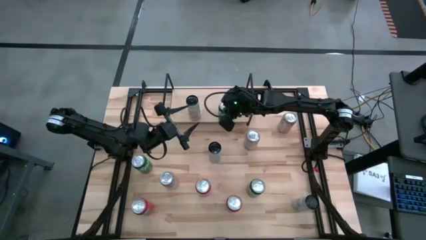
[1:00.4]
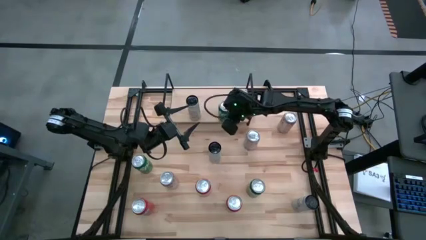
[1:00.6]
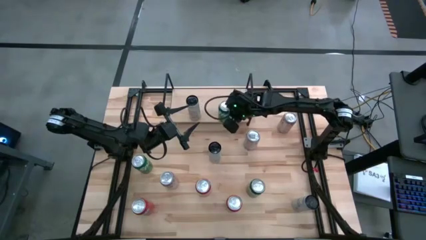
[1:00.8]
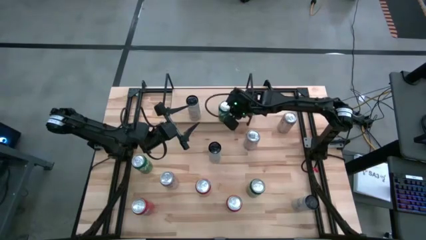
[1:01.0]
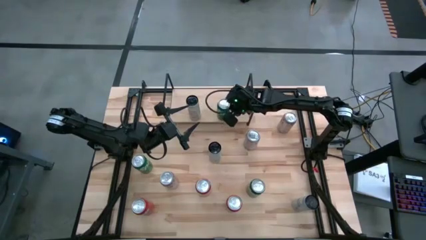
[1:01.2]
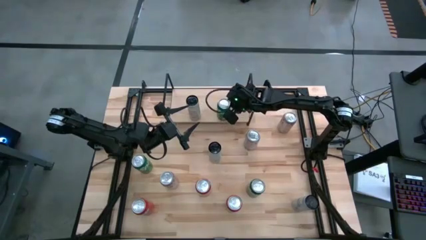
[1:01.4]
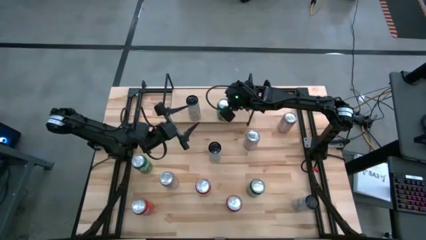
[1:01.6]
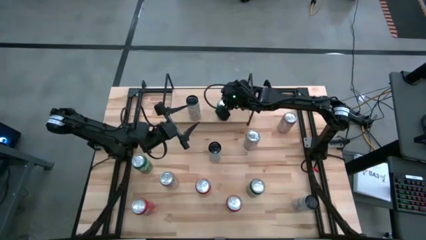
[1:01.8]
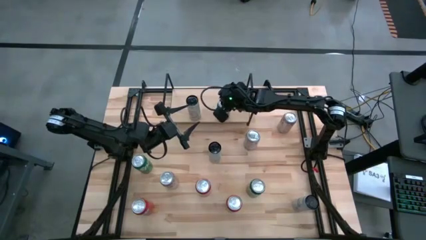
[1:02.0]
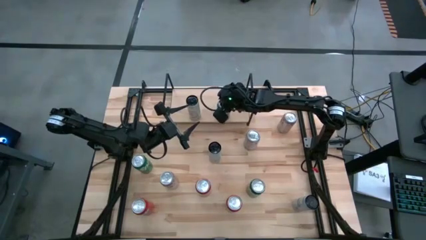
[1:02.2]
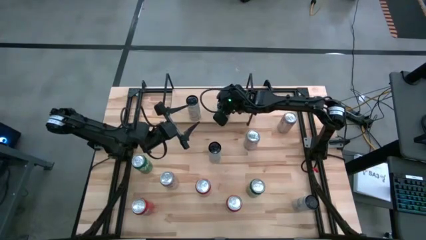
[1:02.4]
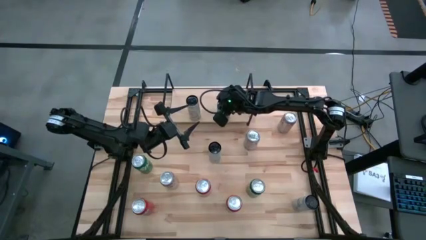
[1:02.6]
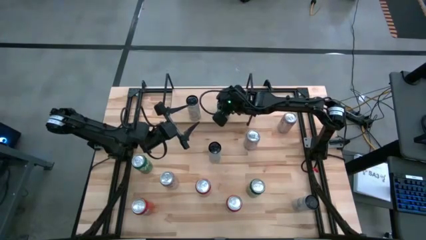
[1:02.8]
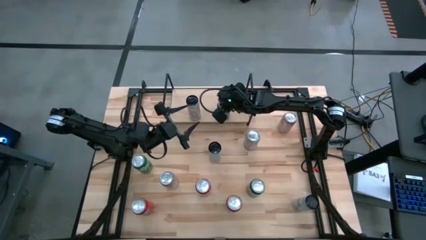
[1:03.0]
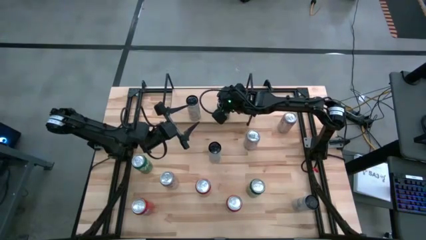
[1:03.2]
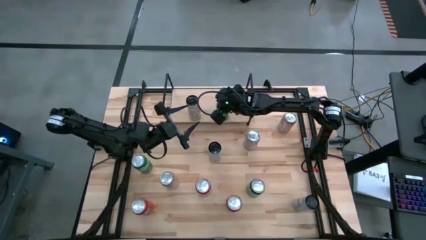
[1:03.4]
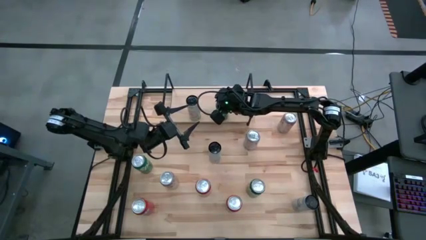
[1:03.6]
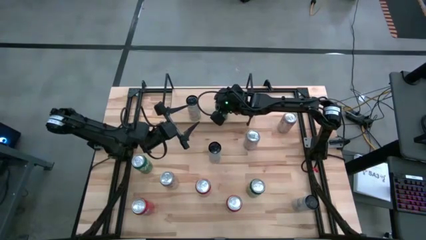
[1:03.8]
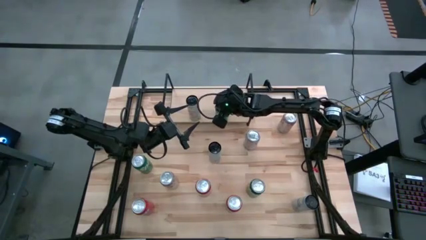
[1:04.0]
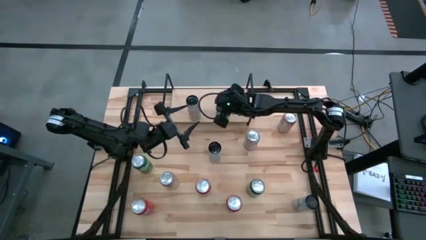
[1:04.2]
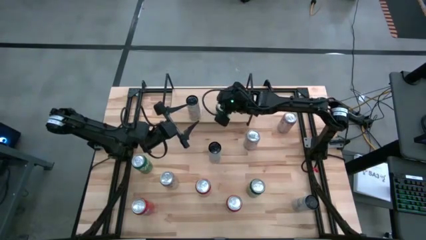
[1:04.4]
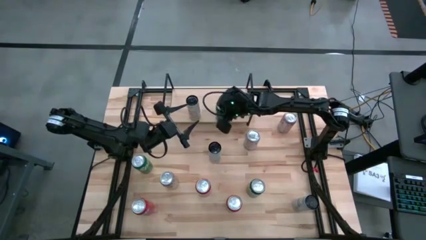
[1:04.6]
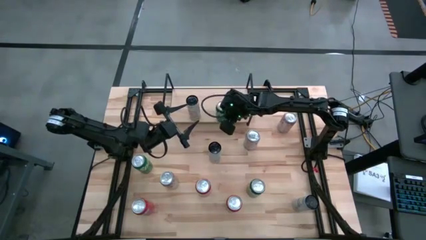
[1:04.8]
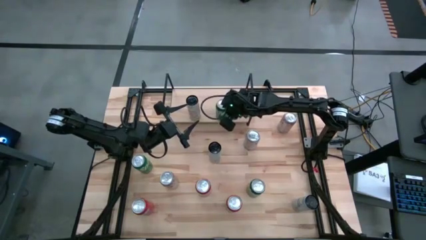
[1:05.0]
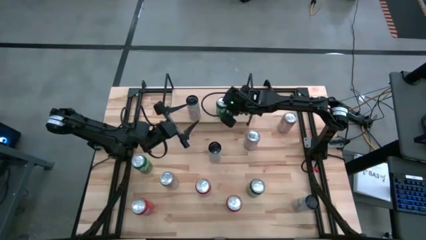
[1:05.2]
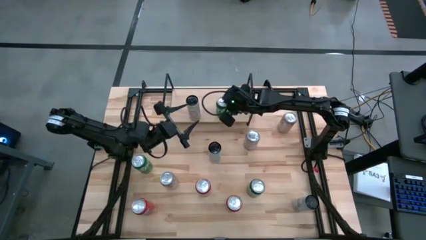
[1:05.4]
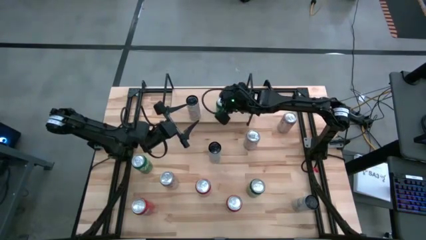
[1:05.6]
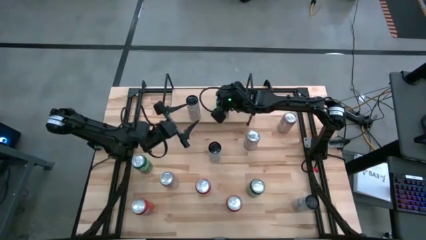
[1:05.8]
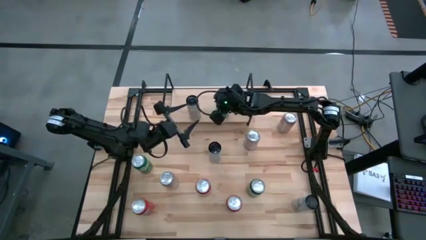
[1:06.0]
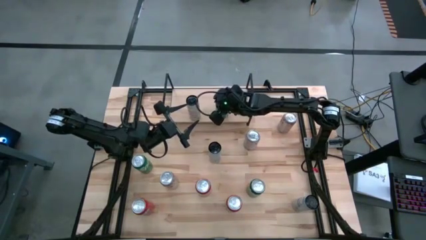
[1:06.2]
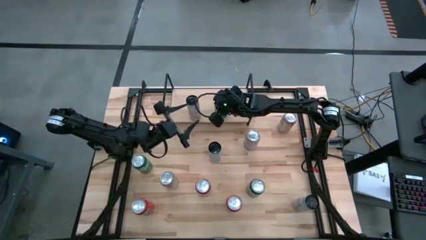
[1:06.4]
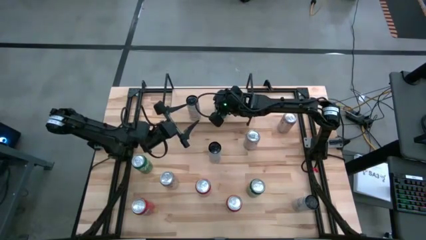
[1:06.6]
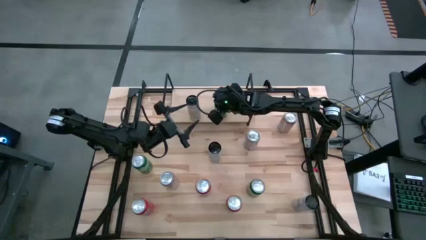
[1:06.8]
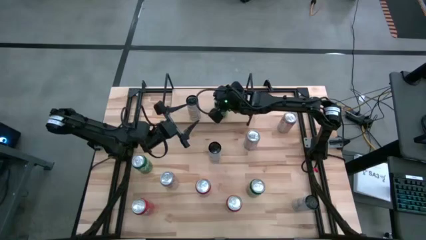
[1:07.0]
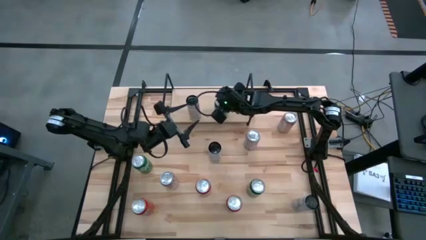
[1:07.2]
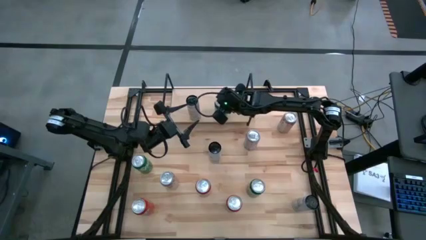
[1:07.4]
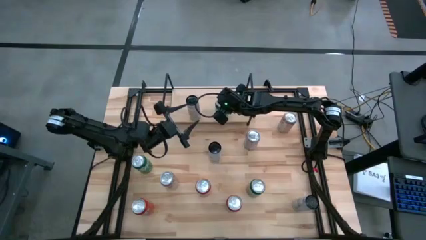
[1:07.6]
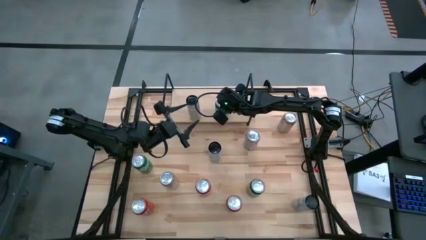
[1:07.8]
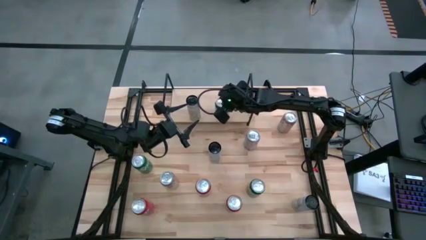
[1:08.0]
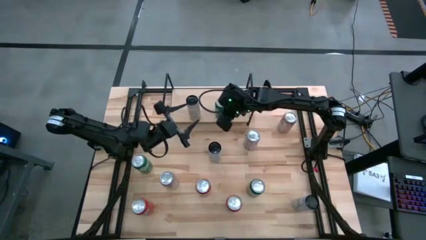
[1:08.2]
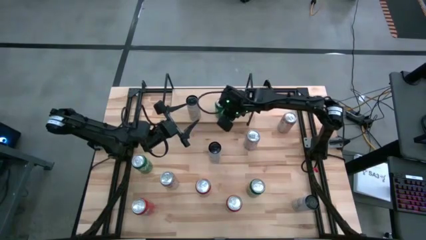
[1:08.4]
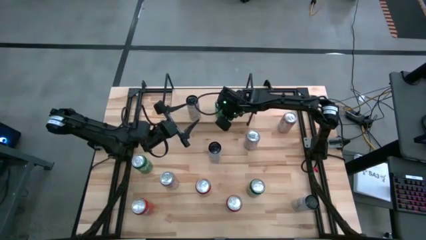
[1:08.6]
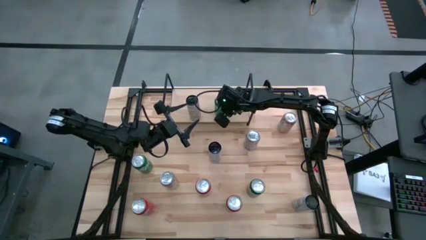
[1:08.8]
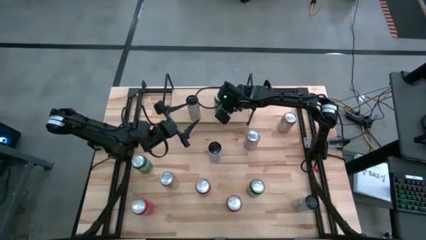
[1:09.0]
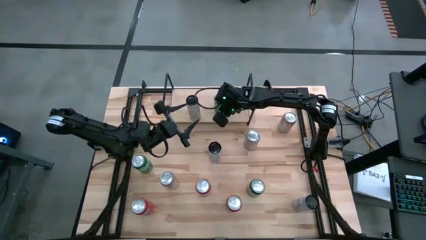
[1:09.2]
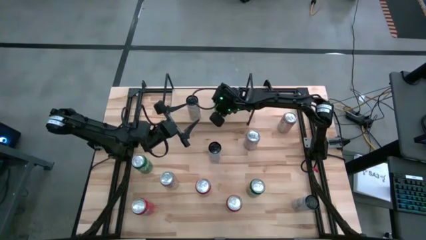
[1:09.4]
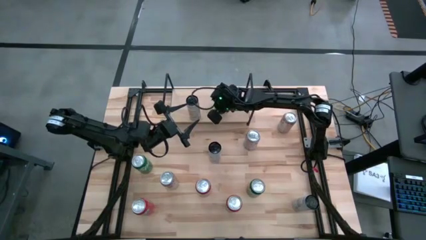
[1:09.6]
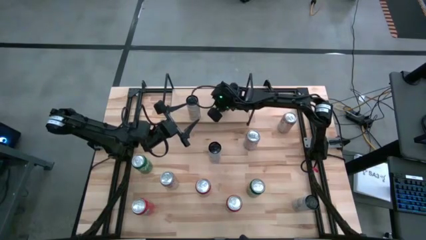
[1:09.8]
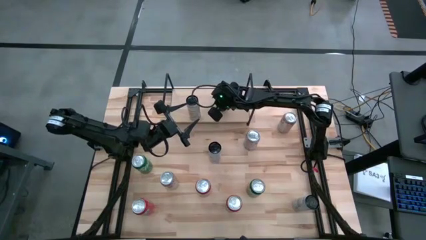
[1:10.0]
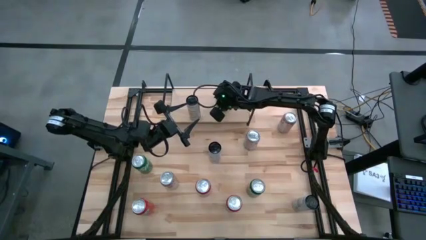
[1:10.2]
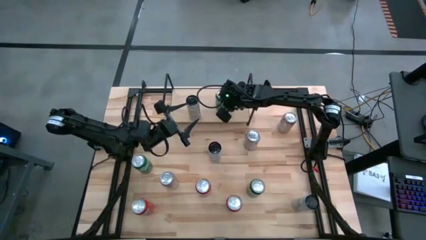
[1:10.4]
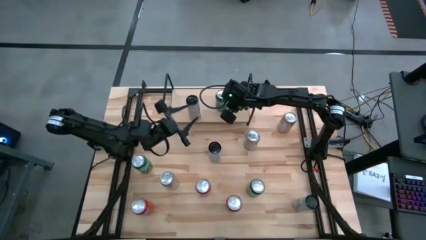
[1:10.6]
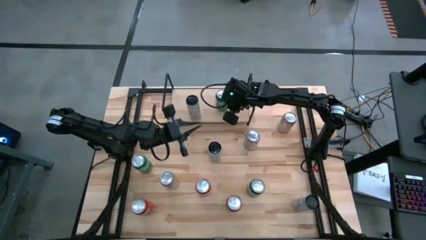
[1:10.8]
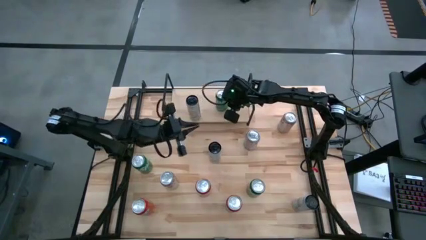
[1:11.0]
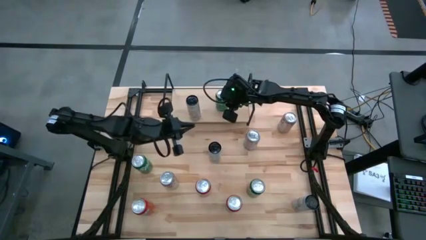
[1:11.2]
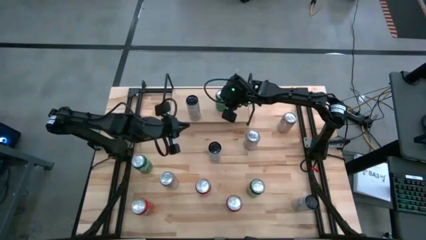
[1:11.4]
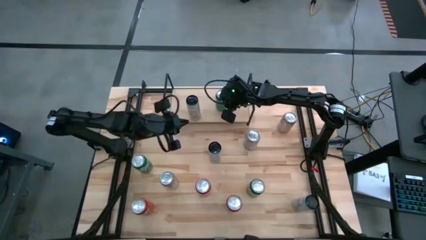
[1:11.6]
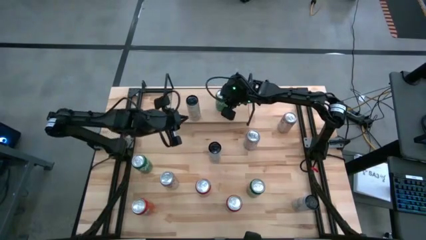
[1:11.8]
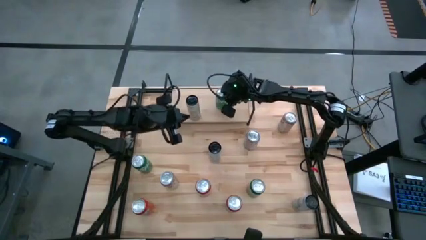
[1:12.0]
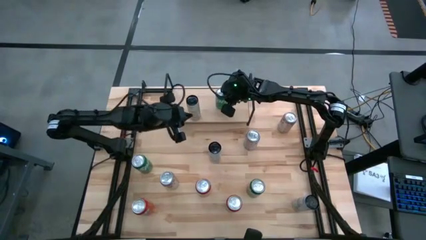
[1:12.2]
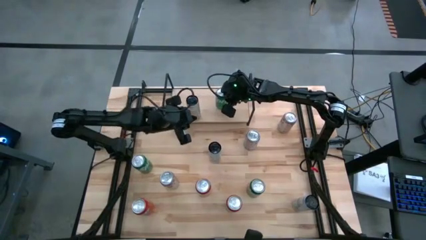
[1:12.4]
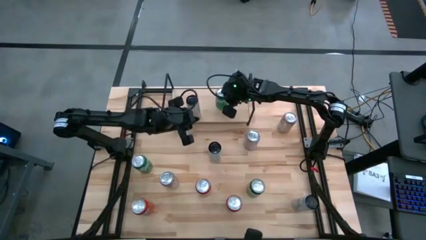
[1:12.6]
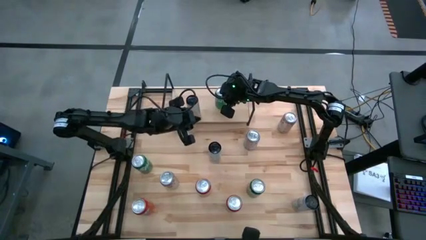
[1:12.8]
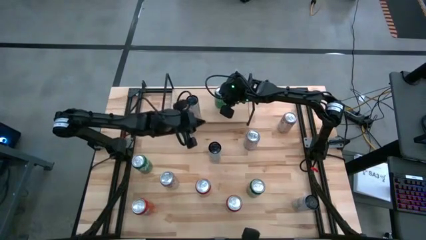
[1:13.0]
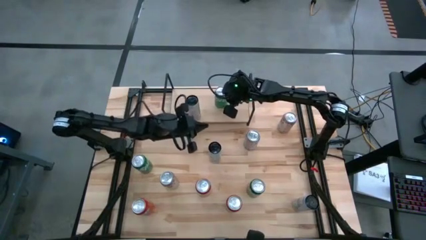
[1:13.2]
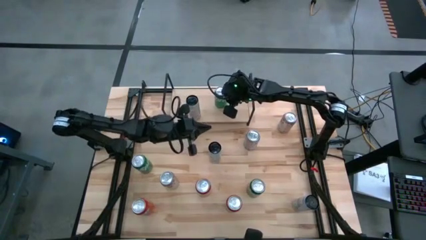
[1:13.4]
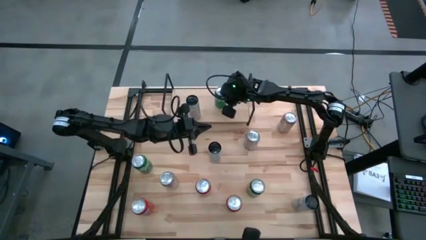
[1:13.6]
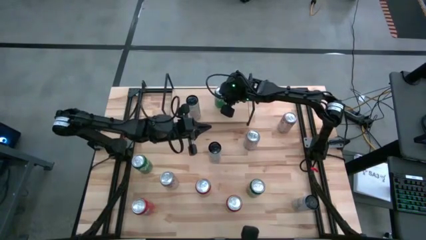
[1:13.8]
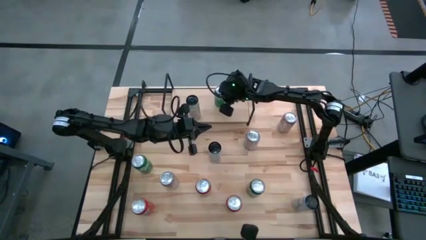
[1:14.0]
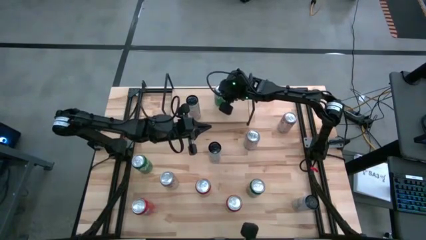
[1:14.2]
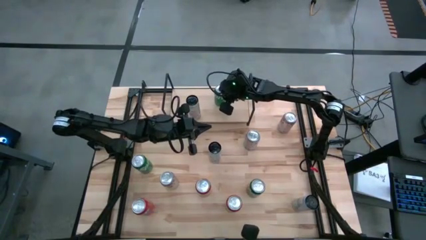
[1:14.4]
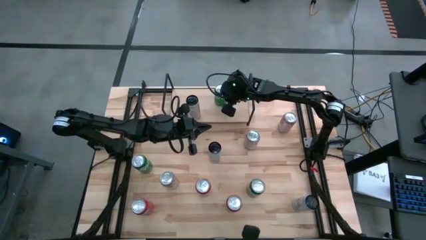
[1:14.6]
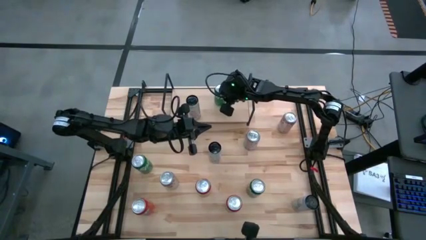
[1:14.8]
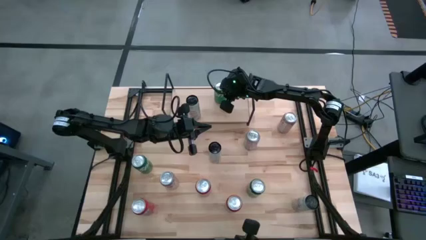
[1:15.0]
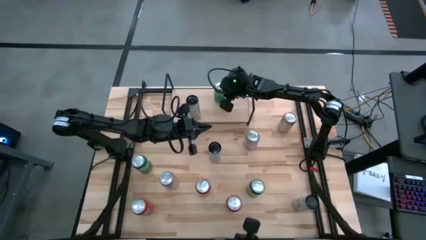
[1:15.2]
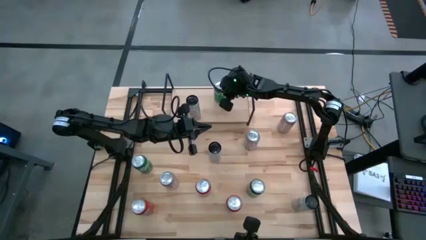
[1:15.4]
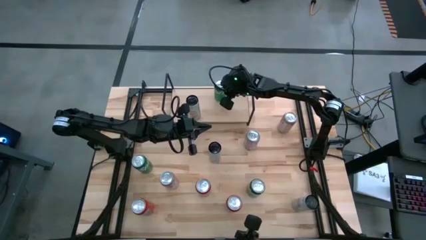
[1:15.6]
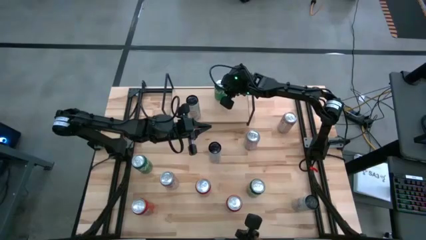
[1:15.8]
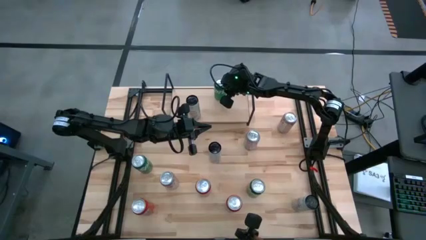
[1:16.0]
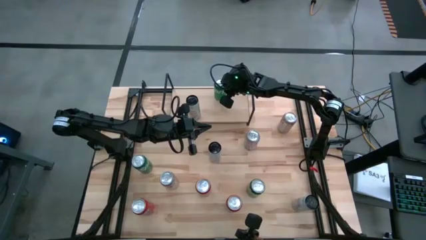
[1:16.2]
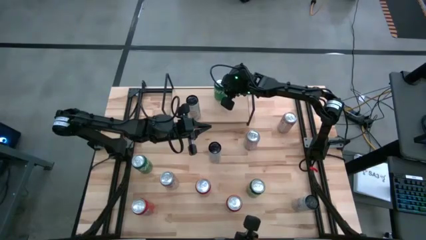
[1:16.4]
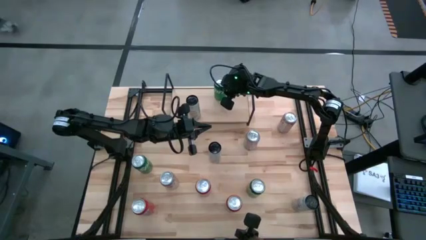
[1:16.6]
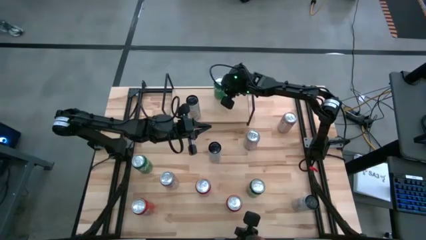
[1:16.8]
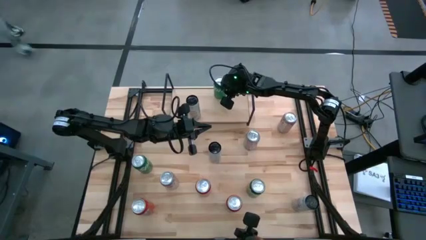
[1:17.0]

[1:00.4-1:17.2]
Task: Sort soda cans
Put the right green soda can on the shelf
